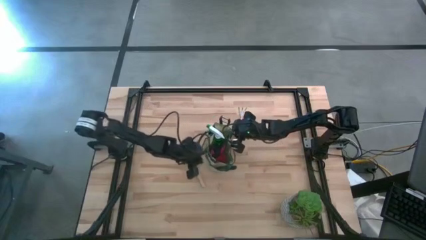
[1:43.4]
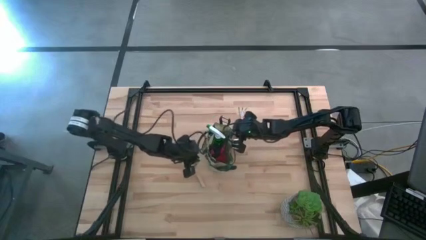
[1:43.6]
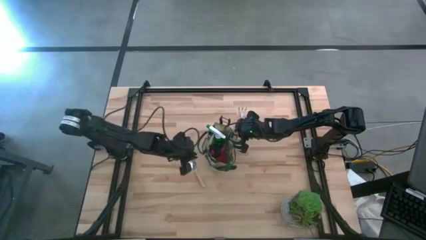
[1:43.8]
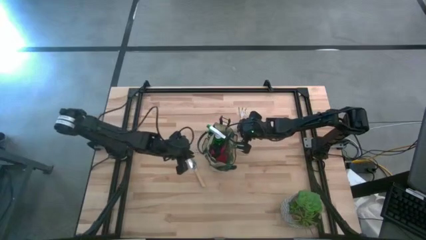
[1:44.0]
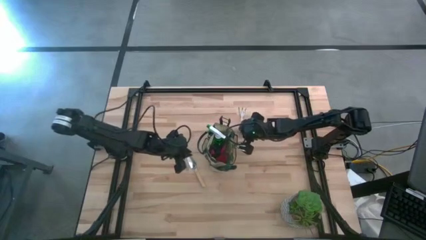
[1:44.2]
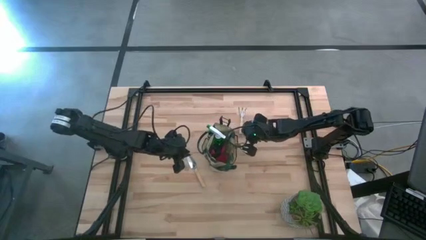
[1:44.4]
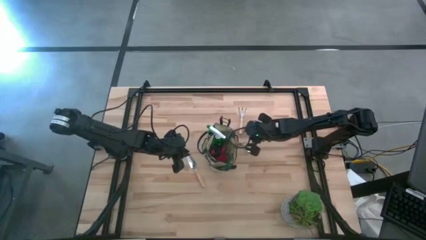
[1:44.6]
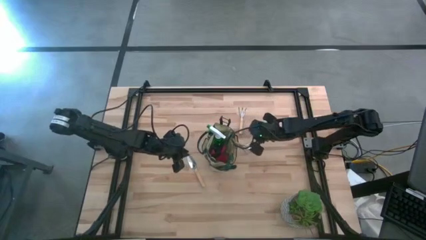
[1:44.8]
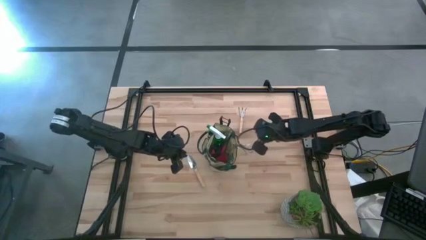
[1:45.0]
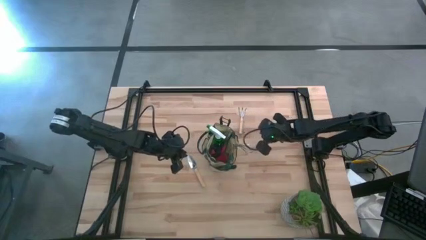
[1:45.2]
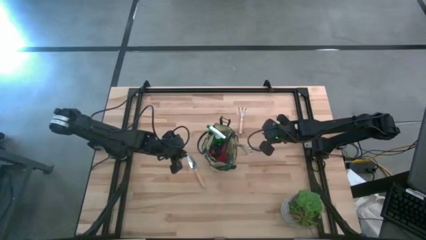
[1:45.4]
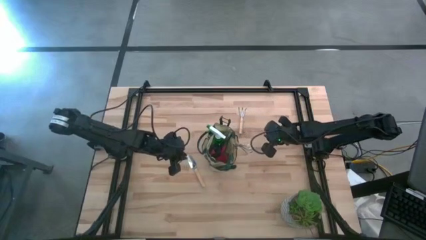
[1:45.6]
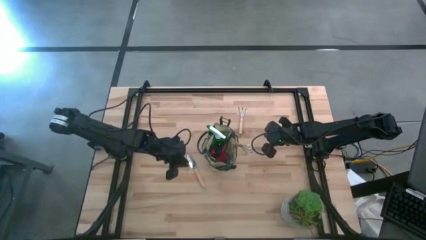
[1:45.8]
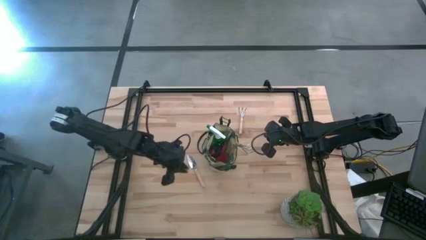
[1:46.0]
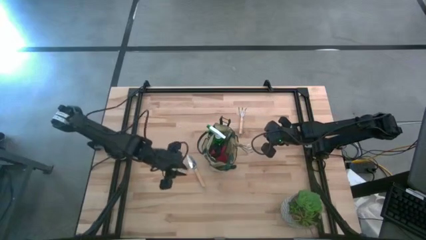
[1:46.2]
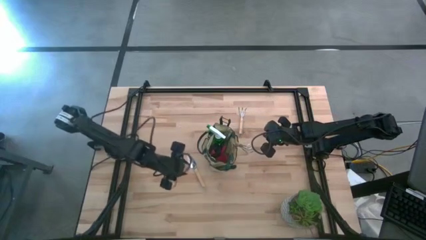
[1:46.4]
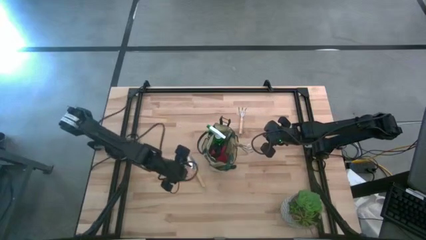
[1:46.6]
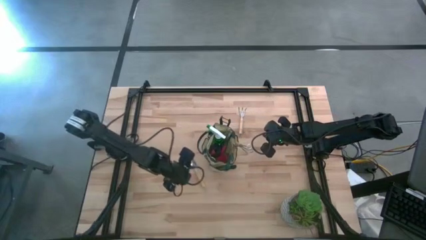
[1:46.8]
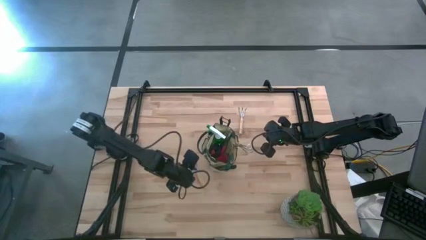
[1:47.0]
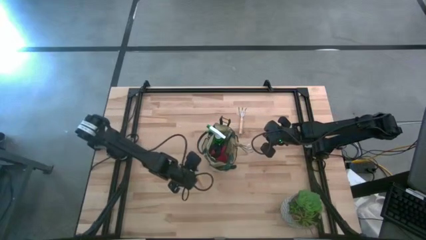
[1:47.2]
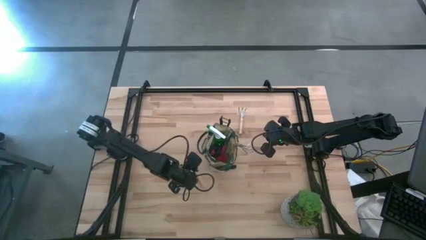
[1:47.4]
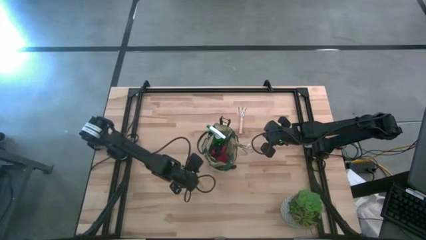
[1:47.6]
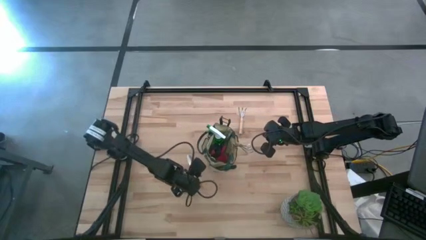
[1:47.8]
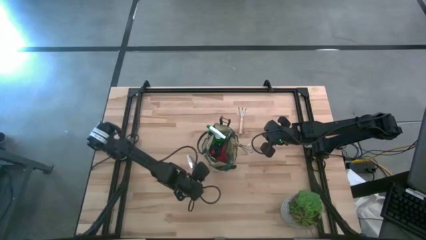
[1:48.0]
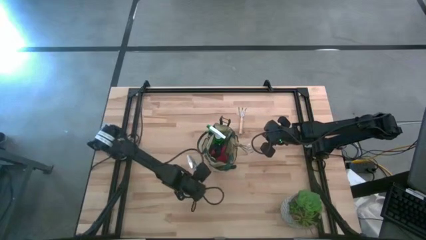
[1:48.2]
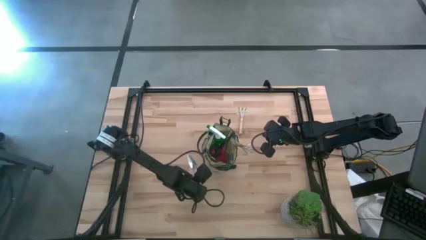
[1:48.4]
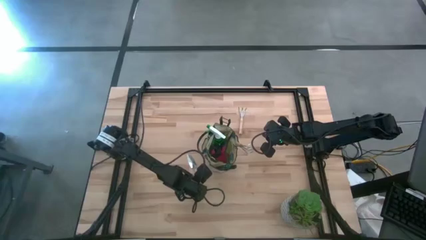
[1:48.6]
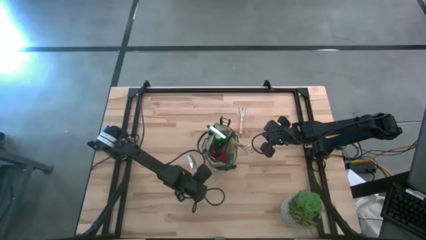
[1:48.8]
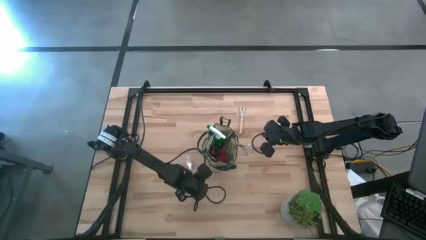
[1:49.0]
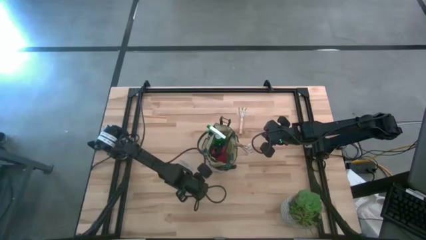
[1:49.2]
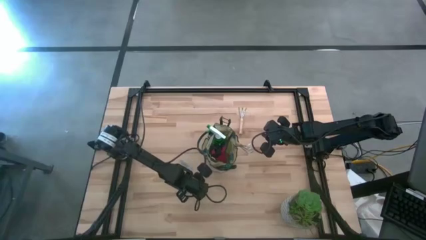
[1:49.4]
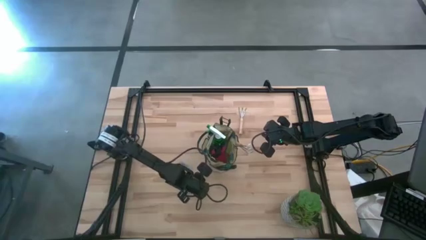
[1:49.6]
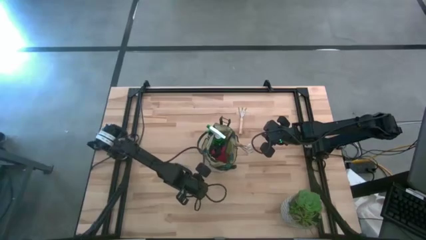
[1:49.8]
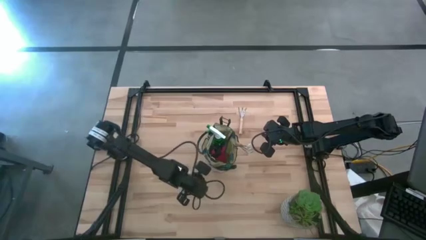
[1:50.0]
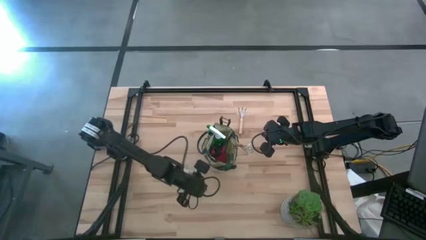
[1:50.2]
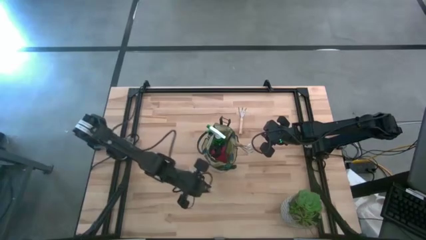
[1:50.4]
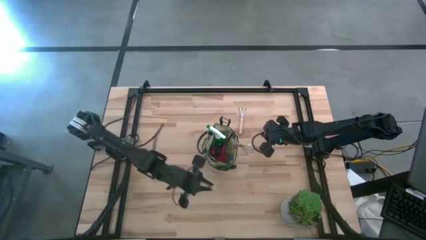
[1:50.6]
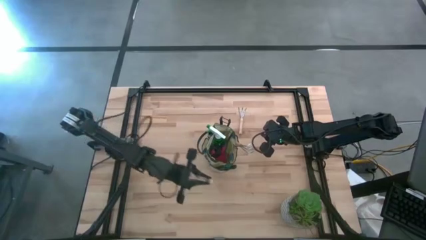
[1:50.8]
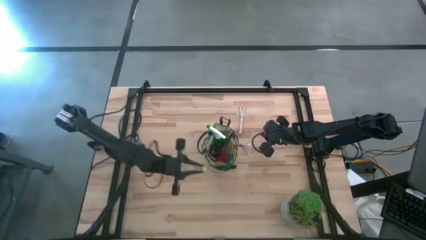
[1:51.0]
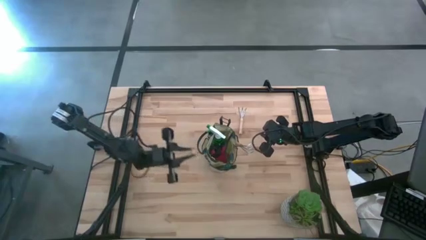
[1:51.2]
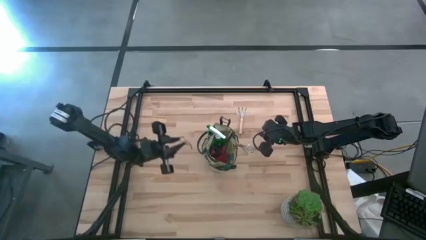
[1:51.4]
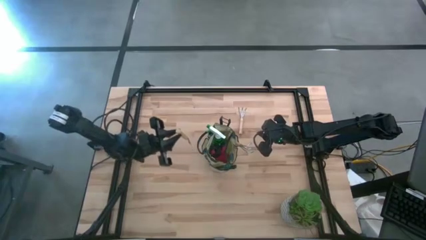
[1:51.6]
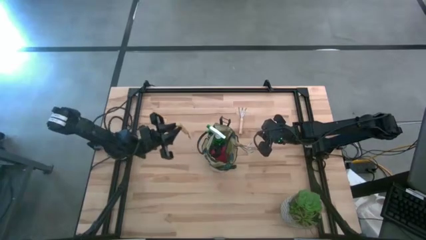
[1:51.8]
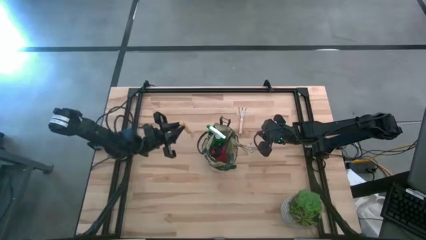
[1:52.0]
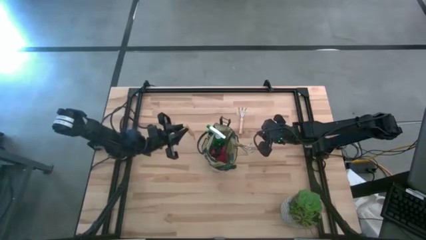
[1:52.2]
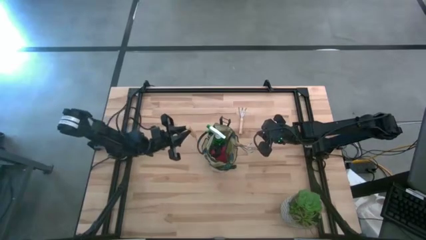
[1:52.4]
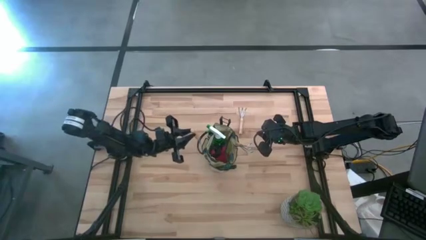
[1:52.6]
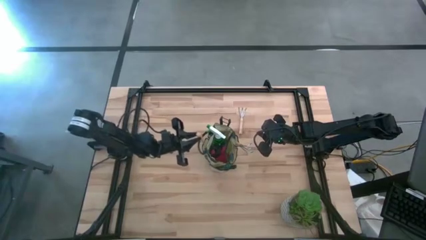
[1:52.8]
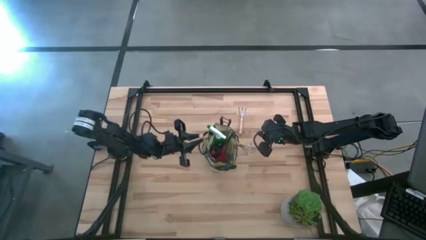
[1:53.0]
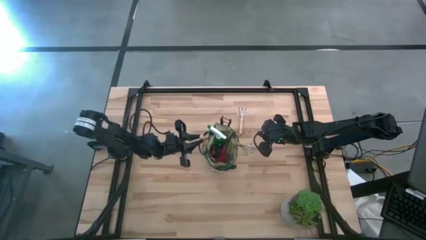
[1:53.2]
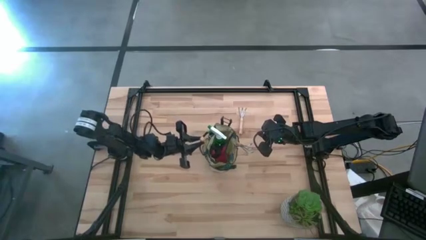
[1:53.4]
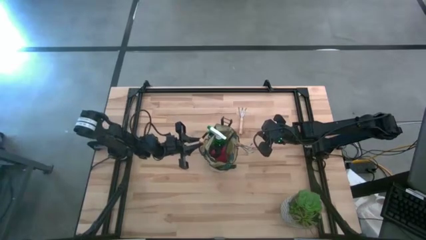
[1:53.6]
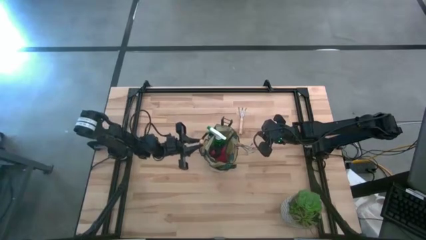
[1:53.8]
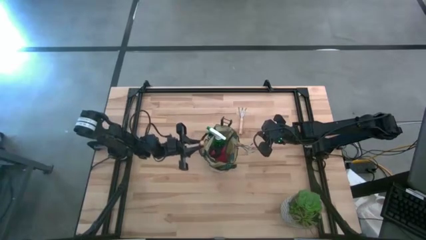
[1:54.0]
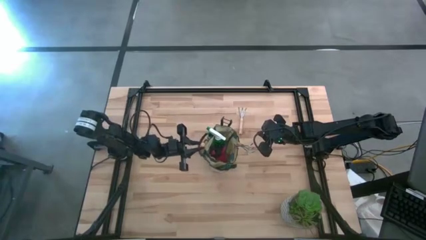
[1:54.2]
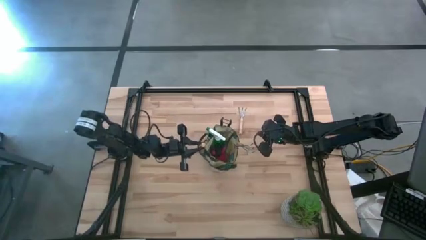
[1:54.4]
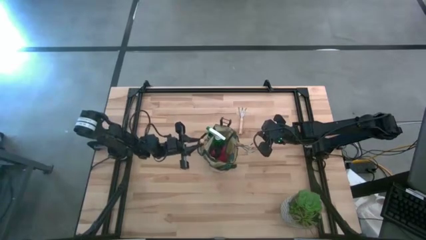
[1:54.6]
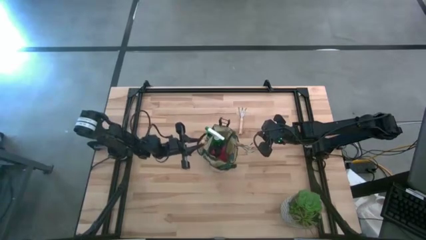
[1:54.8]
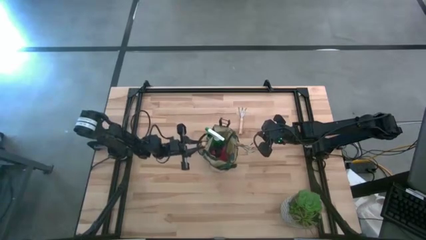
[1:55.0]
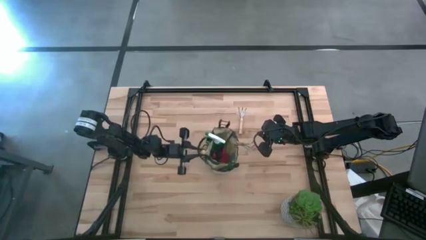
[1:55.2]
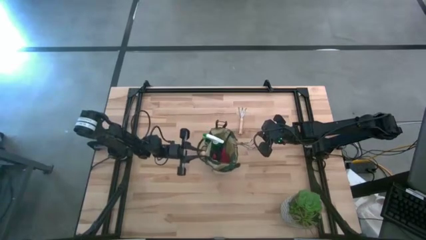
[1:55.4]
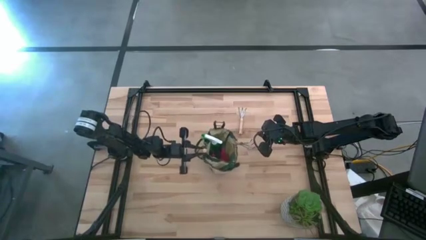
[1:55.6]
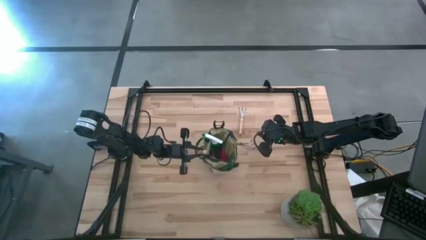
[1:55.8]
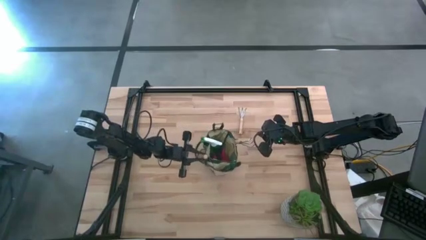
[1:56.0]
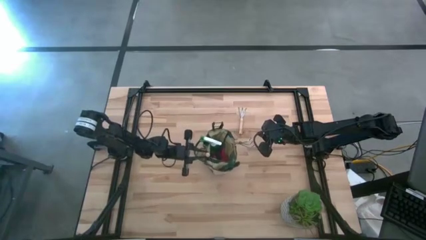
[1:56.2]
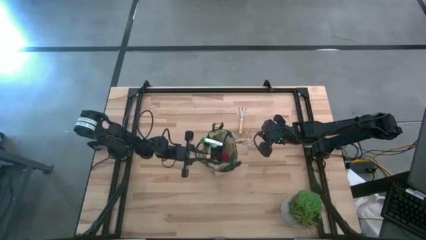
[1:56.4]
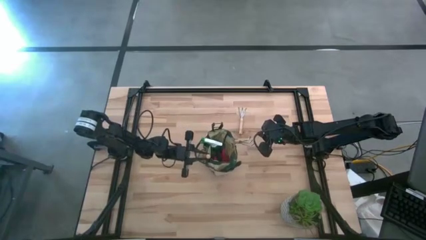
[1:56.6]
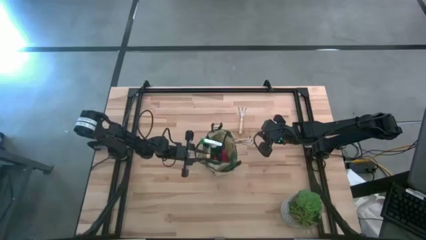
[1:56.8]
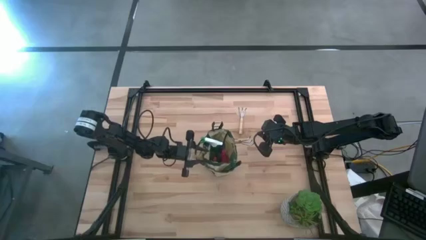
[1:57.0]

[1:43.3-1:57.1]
Task: Pick & Place Garden tools in Gardening bag
Put the light brown trowel into the white gardening bag

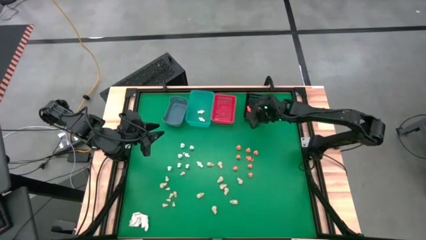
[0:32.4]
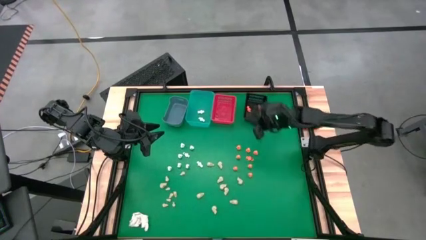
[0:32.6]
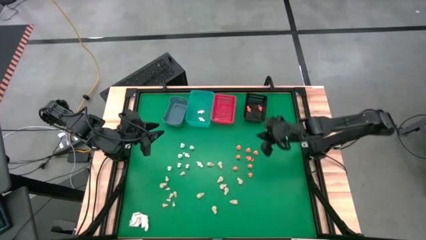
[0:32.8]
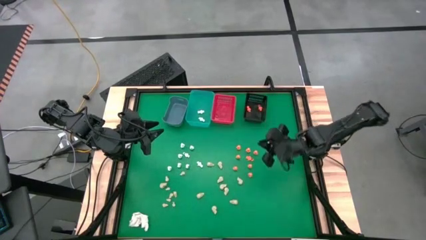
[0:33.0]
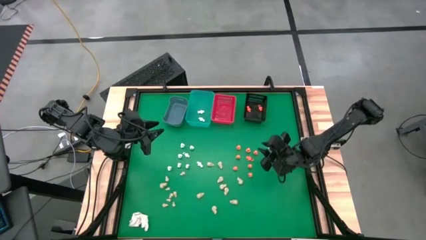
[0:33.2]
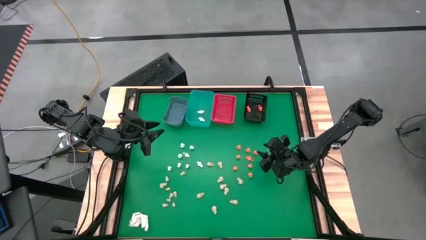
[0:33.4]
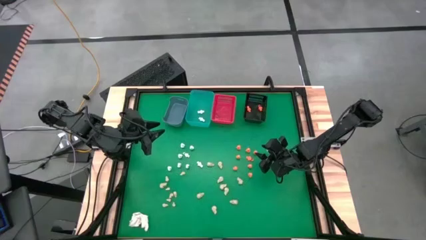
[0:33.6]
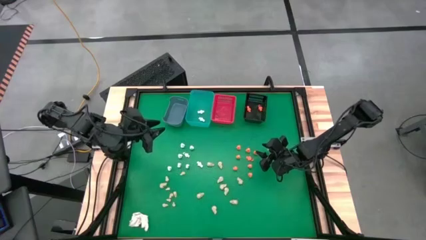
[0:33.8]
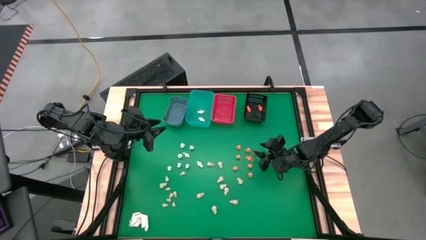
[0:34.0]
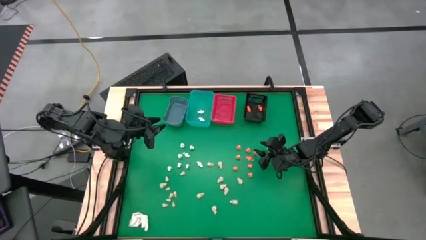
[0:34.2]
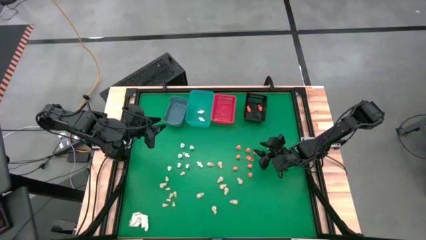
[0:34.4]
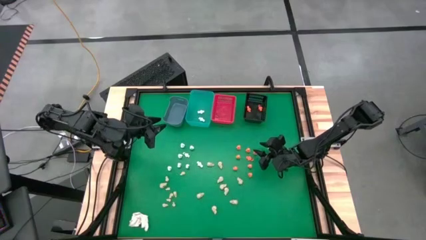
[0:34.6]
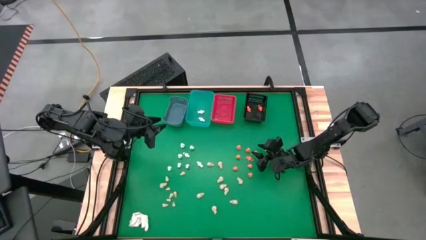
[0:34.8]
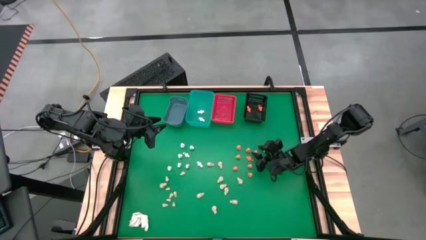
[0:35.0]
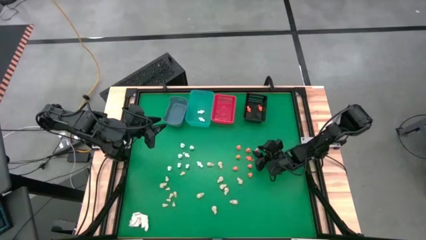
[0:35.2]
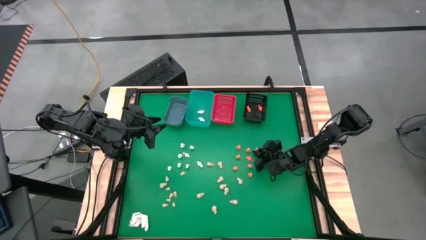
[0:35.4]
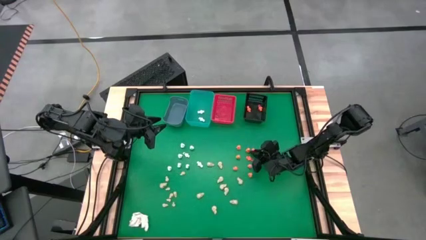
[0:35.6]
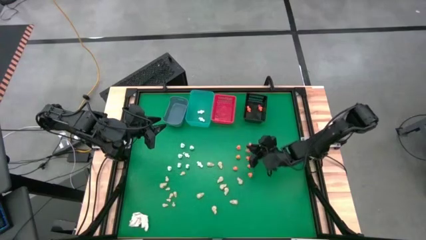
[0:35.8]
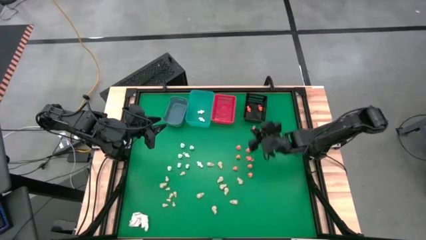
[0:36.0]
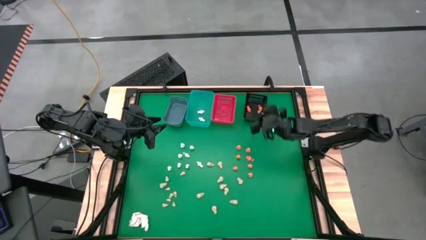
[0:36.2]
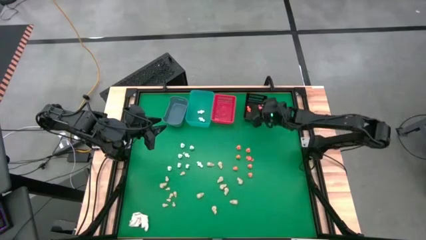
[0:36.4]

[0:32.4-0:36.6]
Task: Sort Halloween decoration
Put the orange skeleton toy into the black bin
